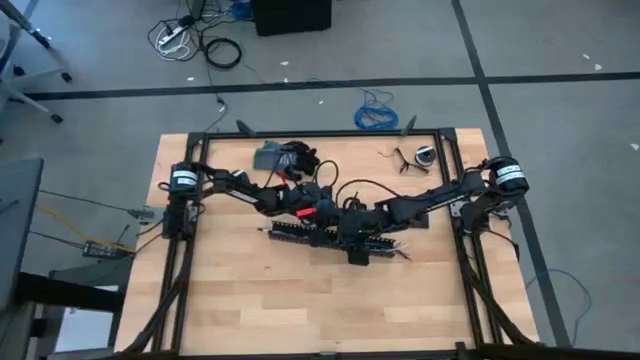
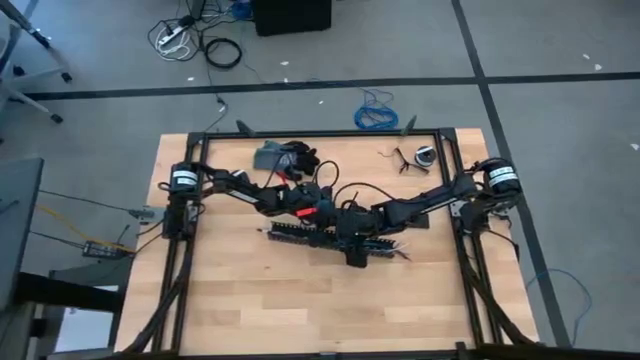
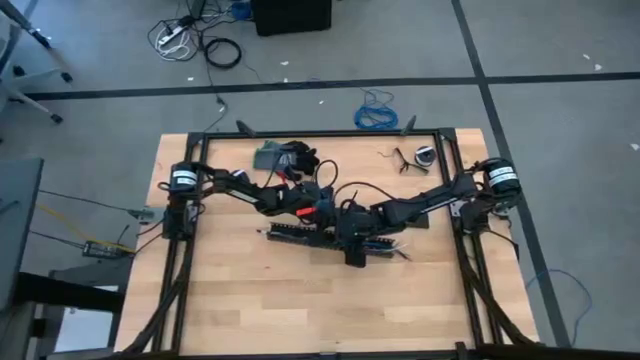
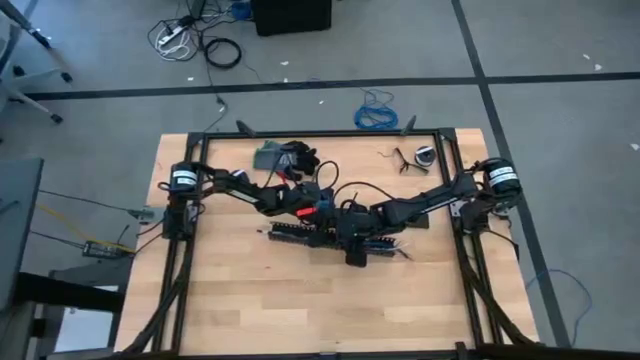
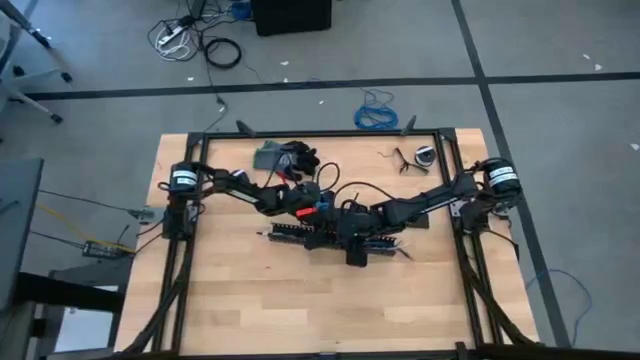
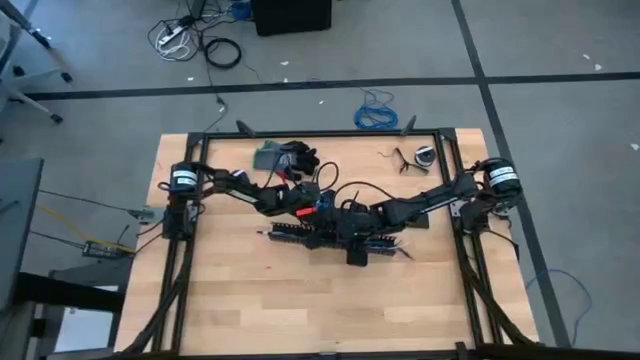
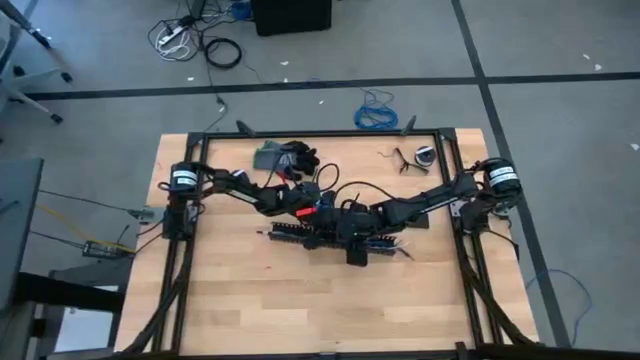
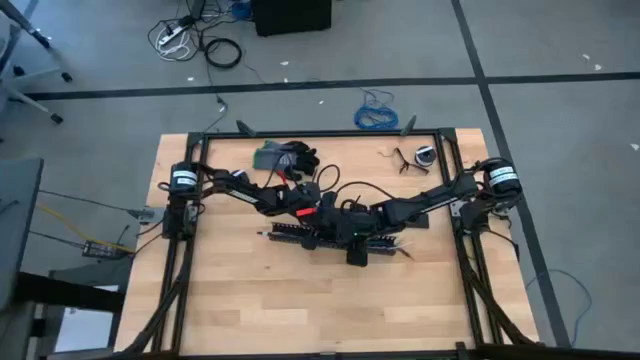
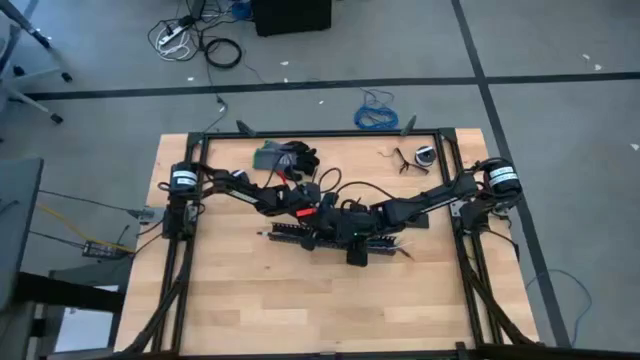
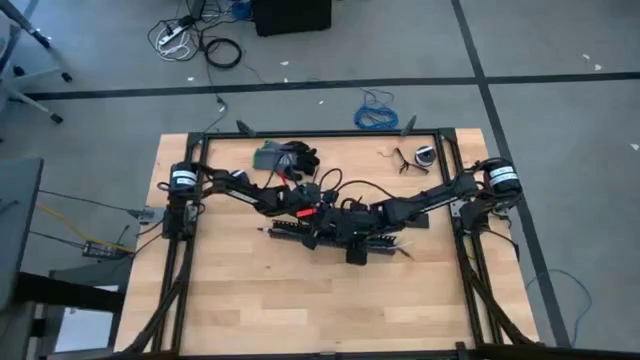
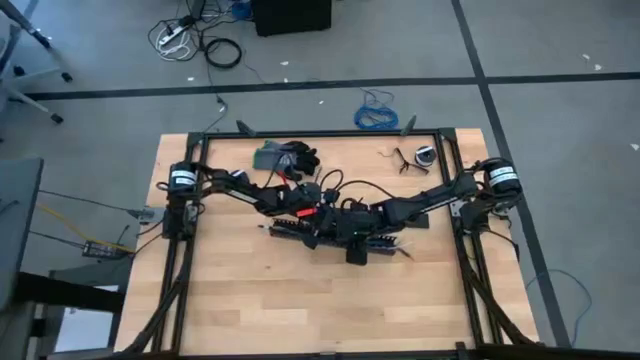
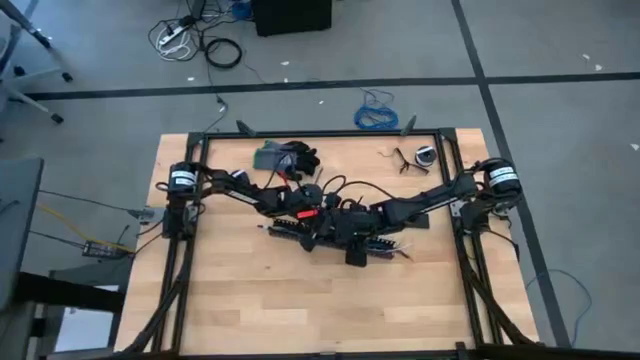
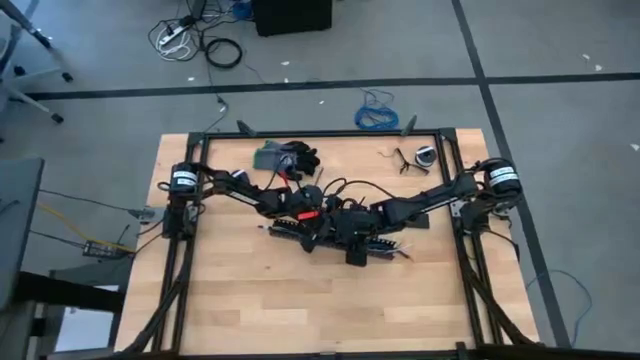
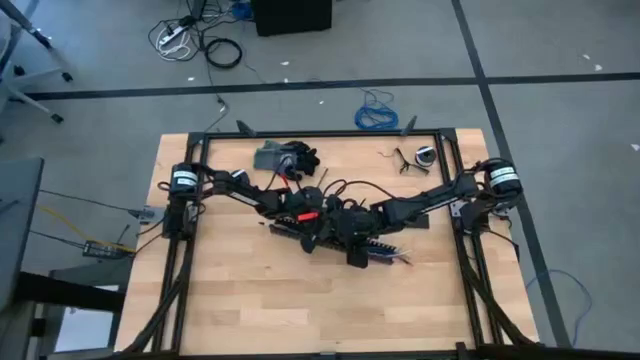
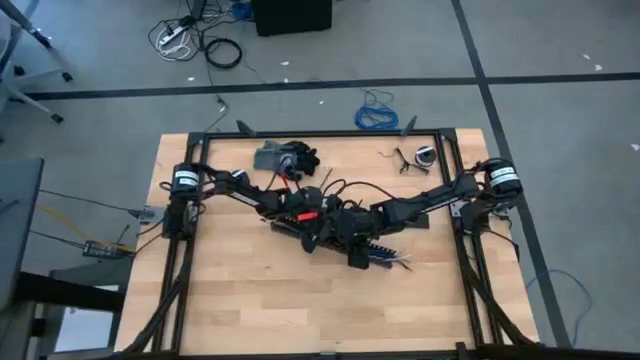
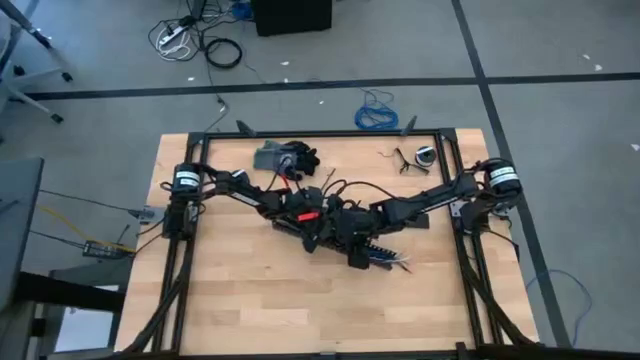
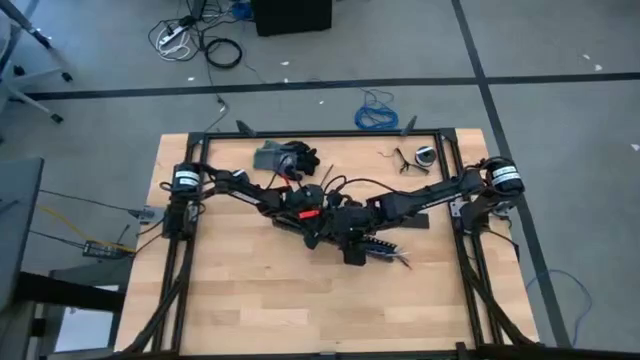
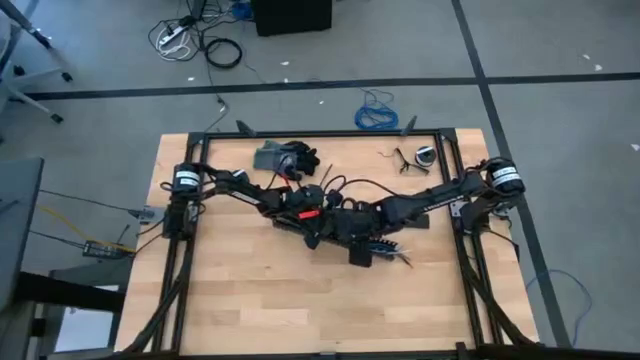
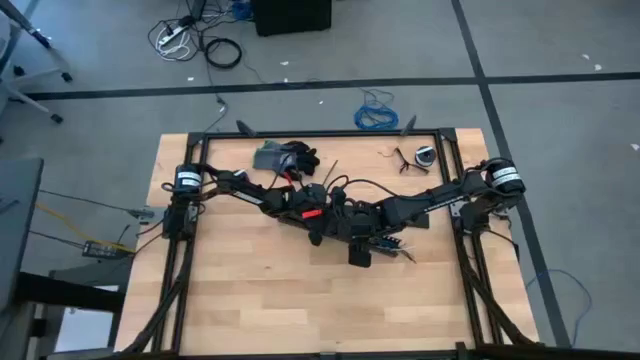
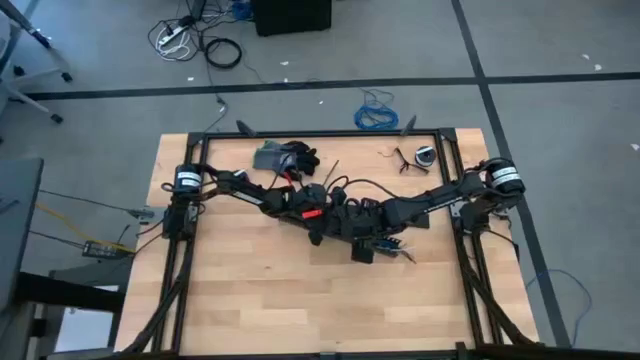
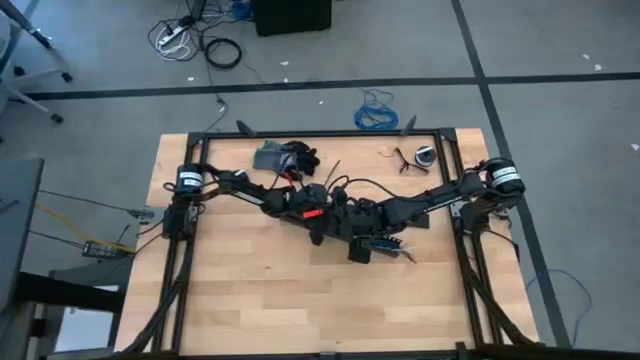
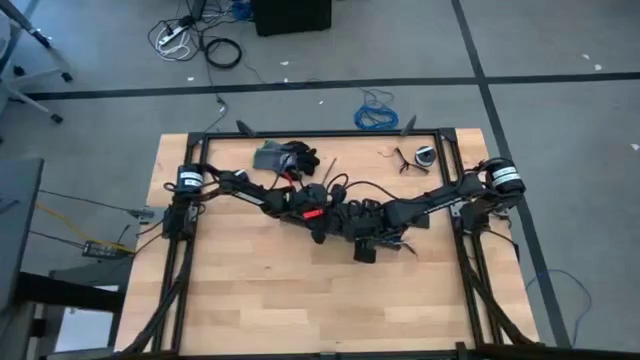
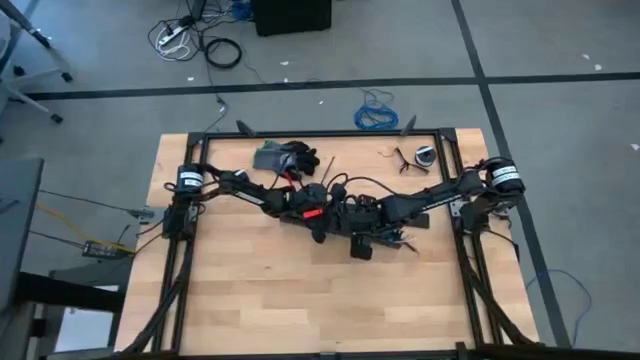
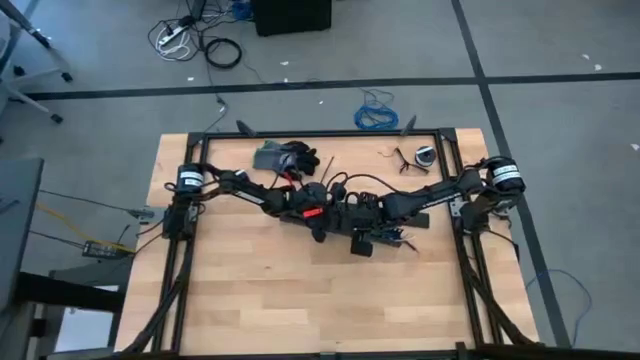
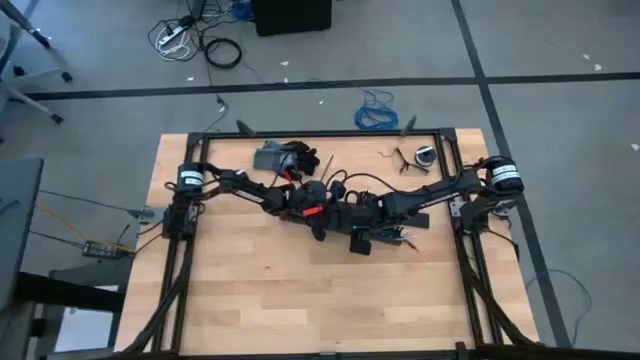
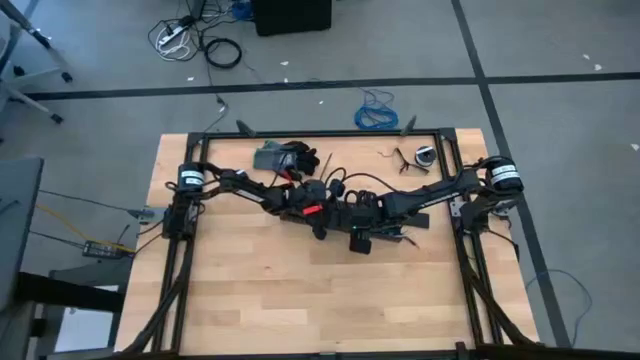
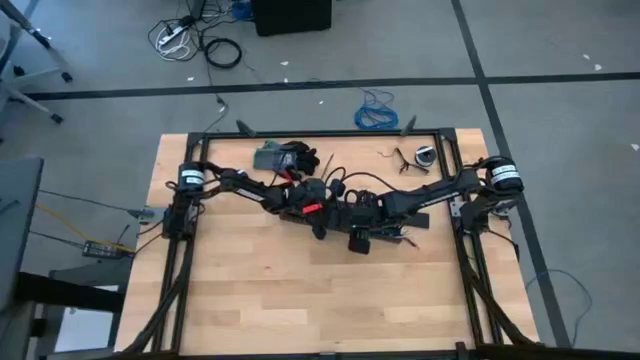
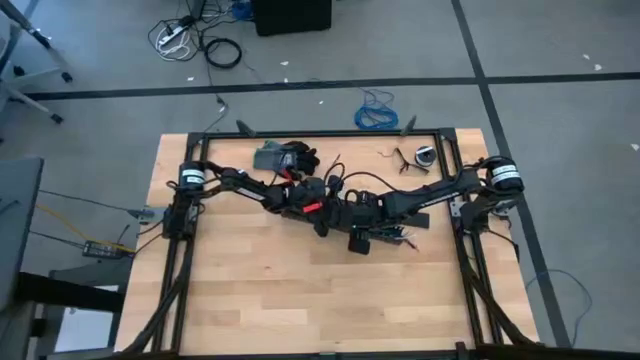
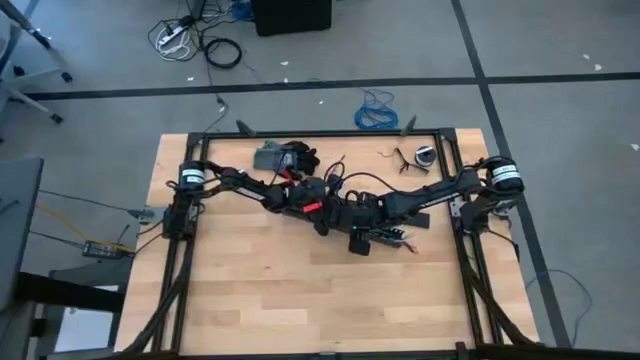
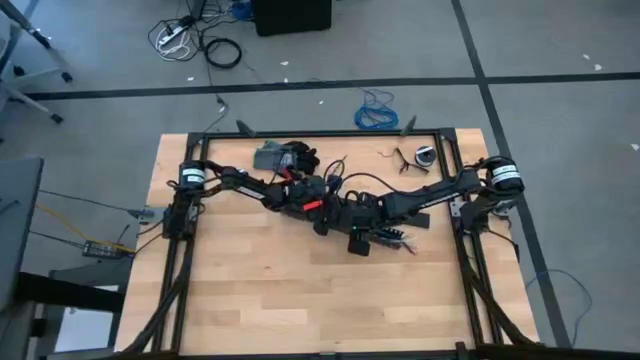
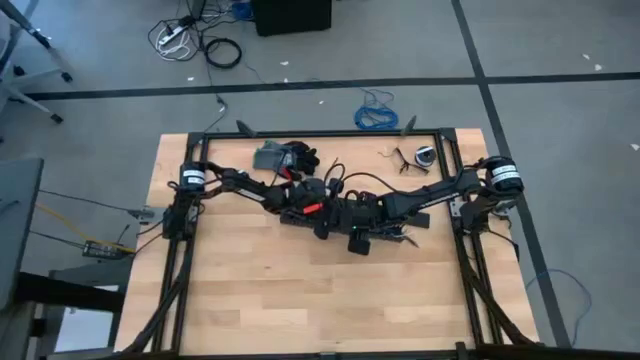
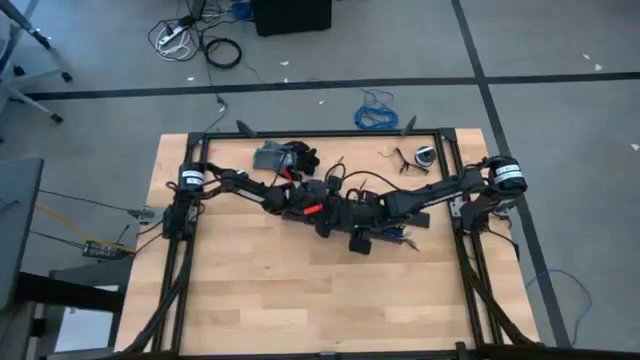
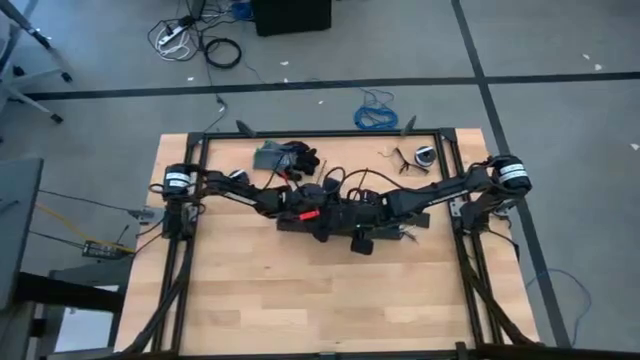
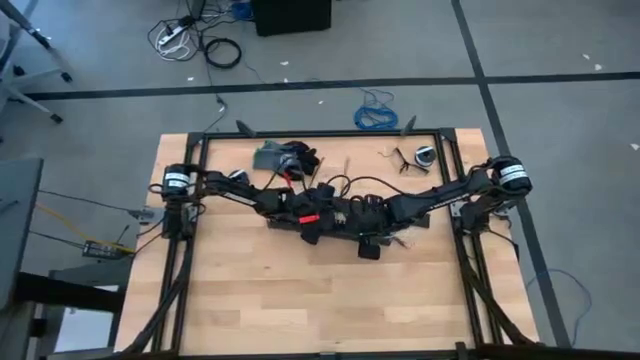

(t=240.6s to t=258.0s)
Task: Ziptie cables
Put the cable wires in the black cable duct

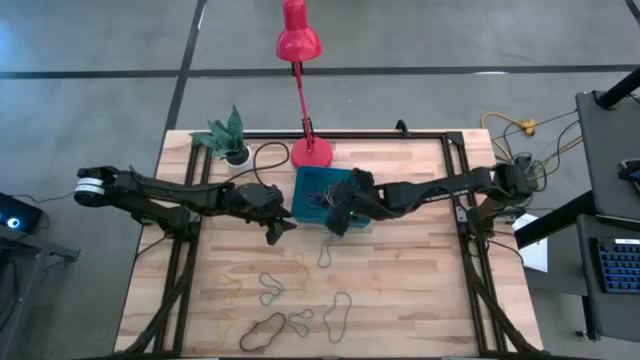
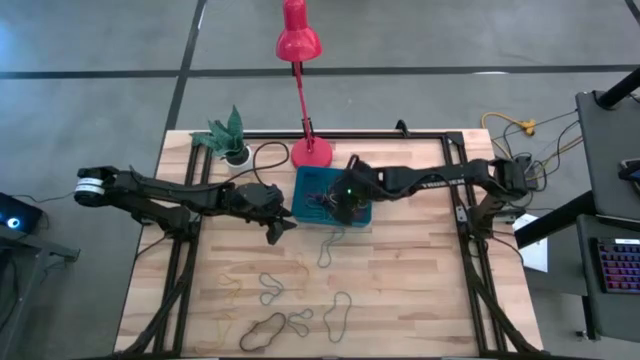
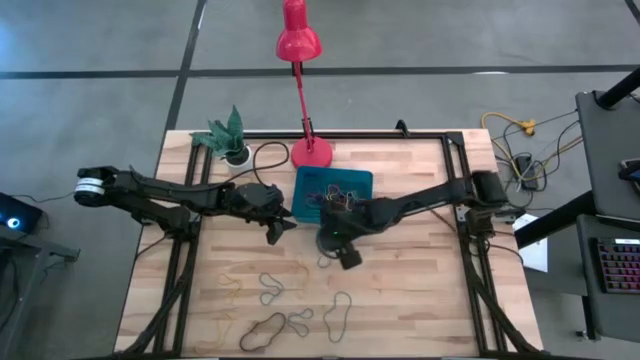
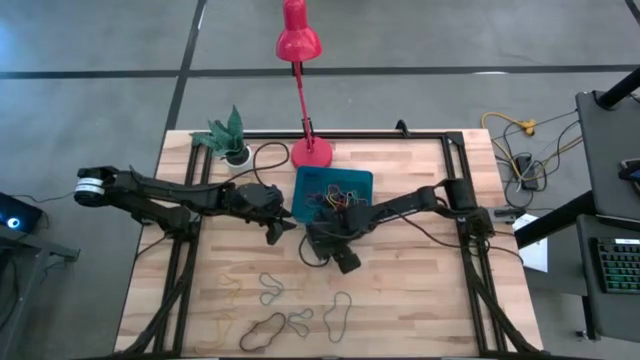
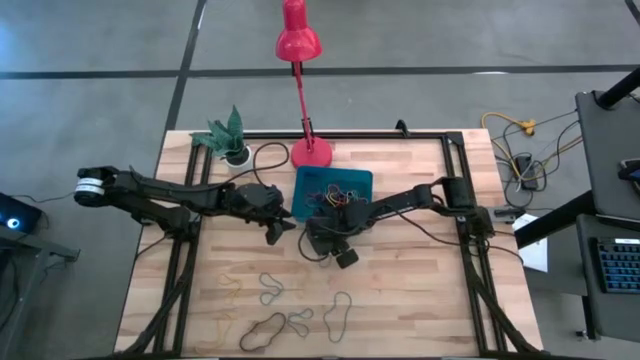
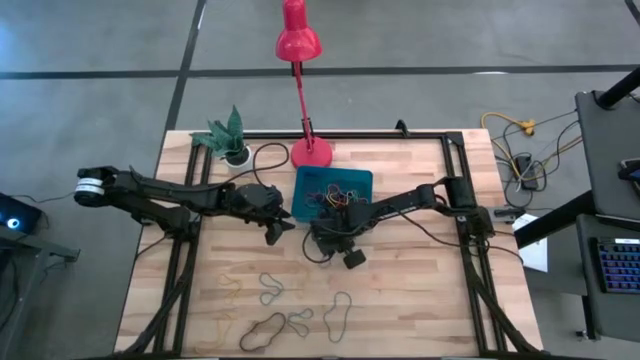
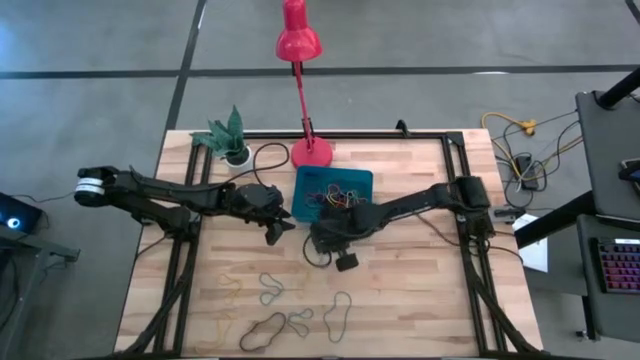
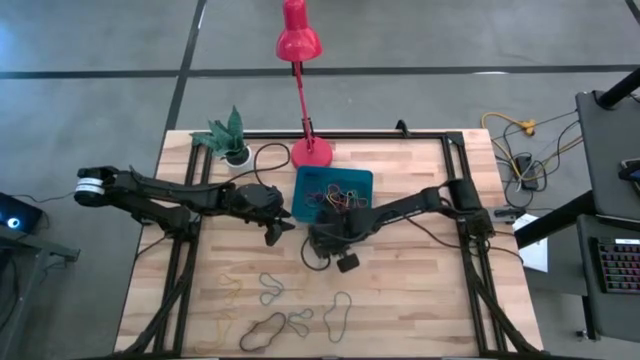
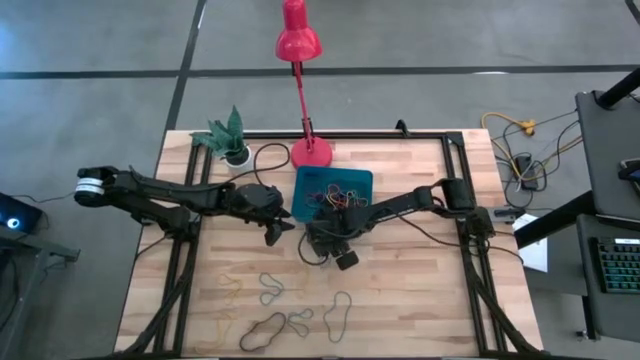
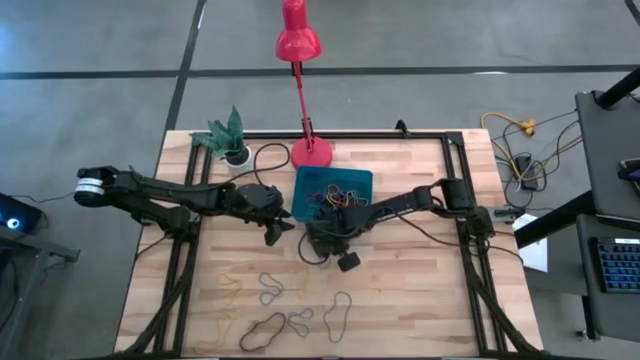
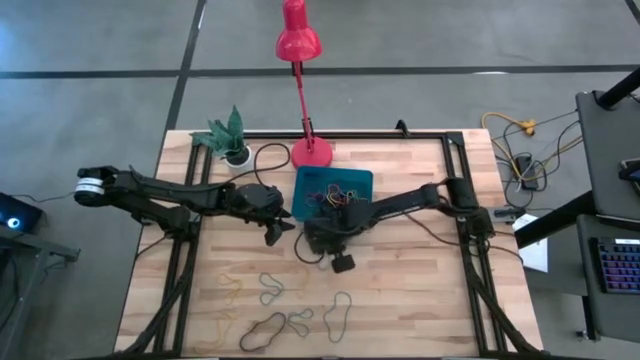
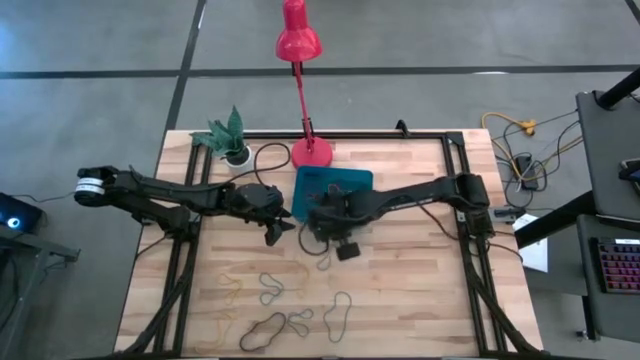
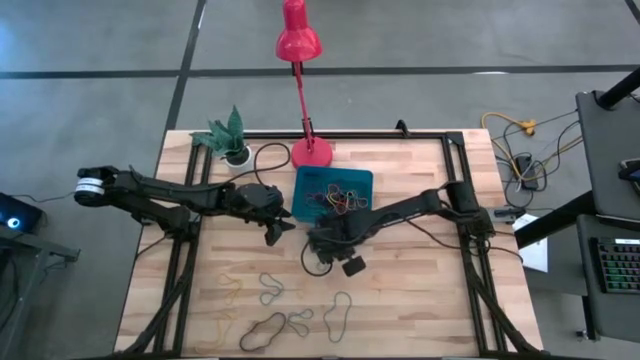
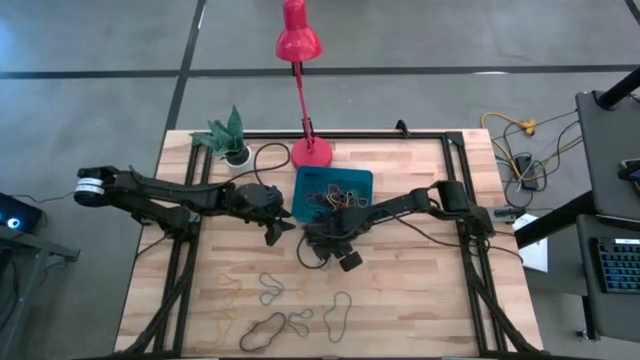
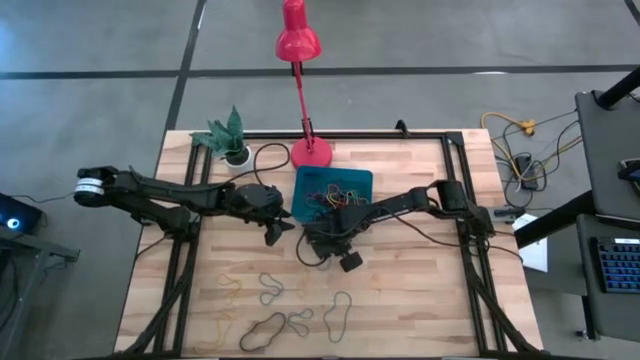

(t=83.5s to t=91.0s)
Task: Pick and place rubber bands into bin
Put the blue rubber band into the blue bin
